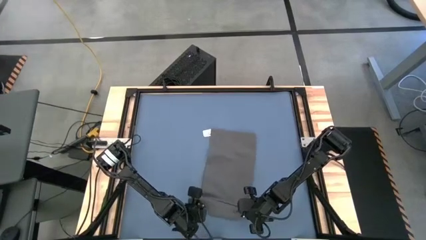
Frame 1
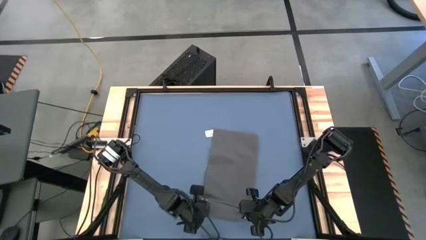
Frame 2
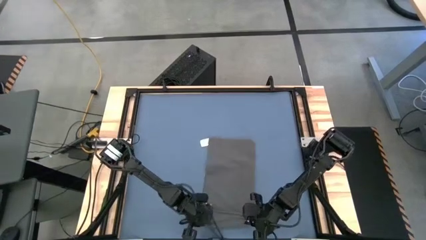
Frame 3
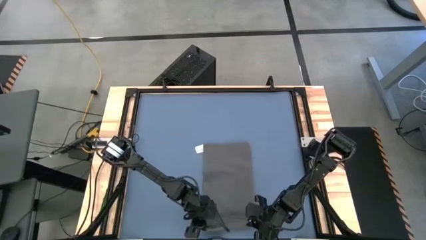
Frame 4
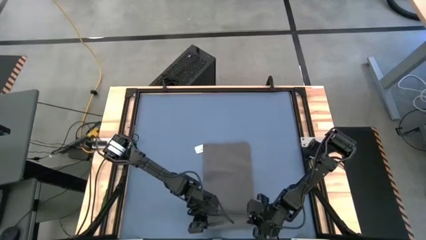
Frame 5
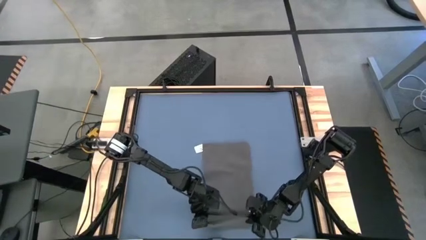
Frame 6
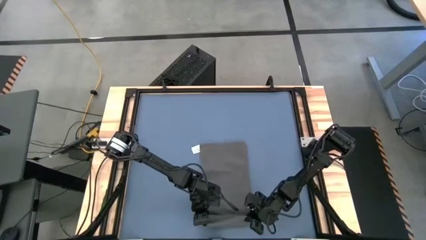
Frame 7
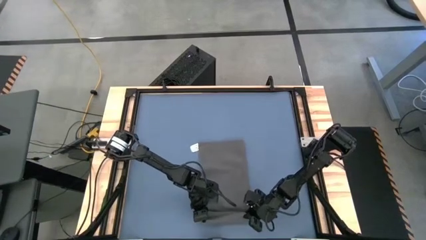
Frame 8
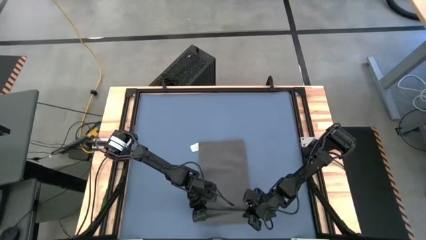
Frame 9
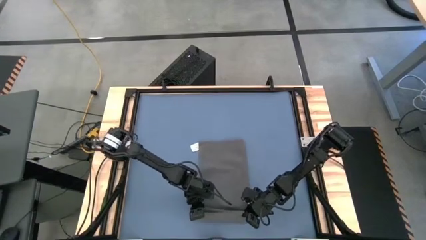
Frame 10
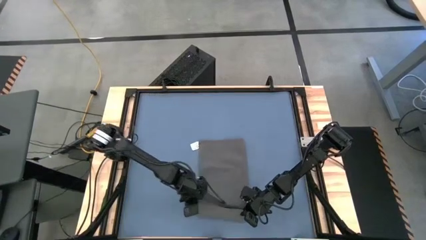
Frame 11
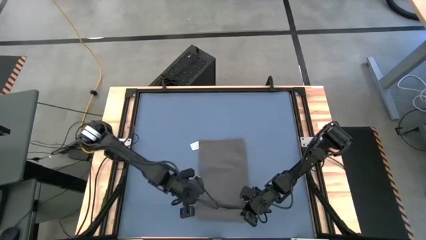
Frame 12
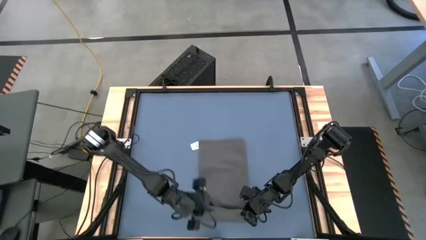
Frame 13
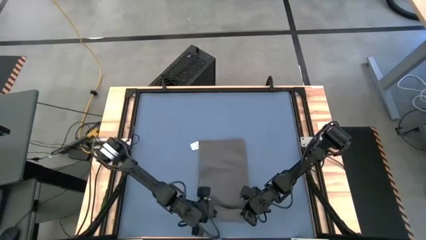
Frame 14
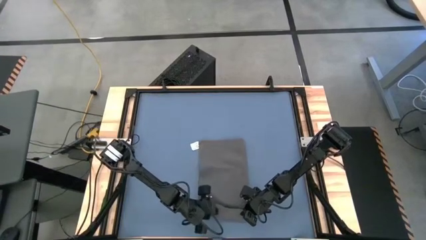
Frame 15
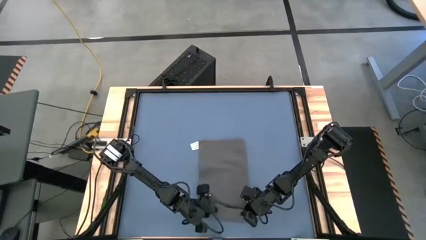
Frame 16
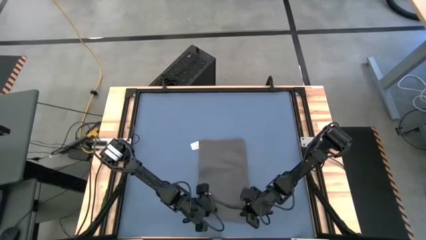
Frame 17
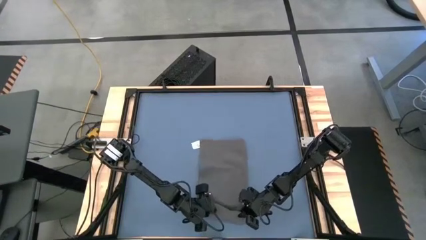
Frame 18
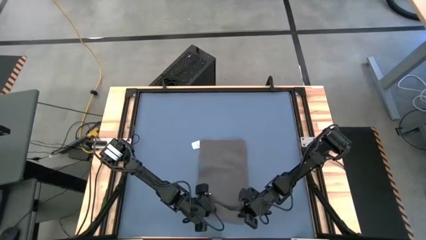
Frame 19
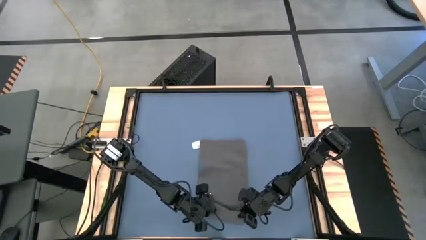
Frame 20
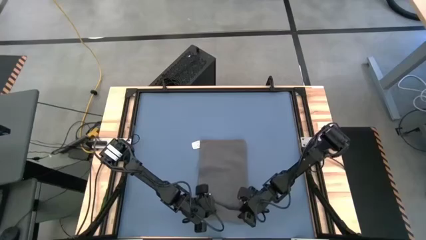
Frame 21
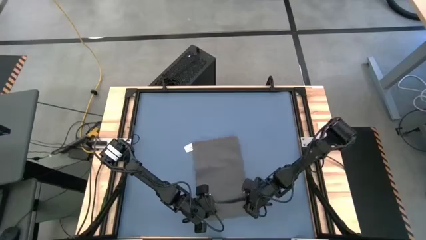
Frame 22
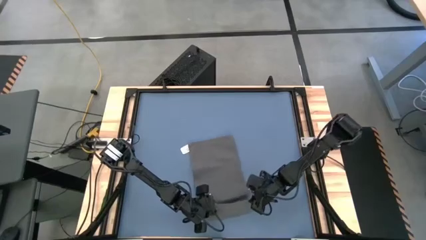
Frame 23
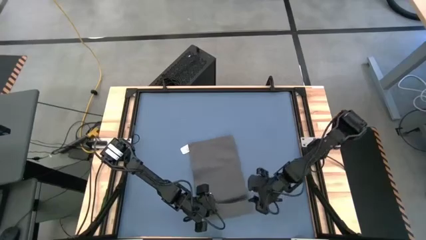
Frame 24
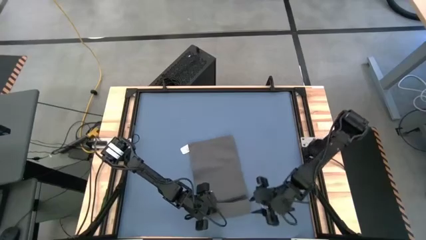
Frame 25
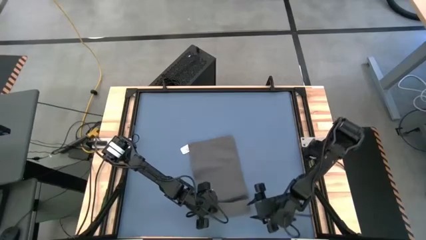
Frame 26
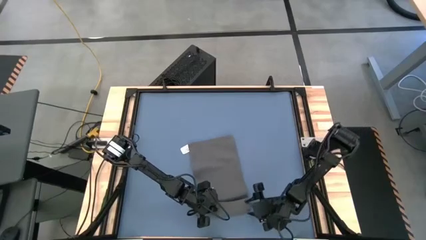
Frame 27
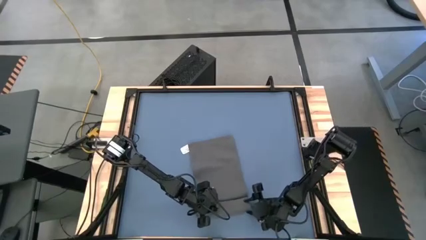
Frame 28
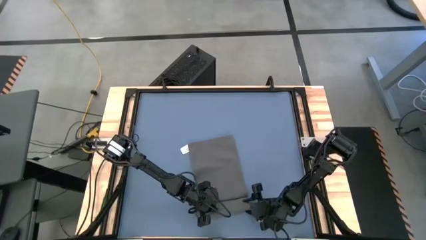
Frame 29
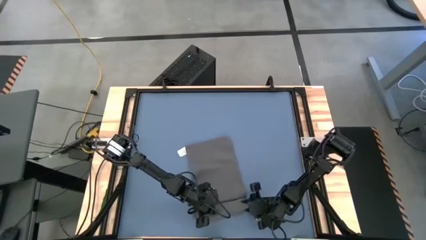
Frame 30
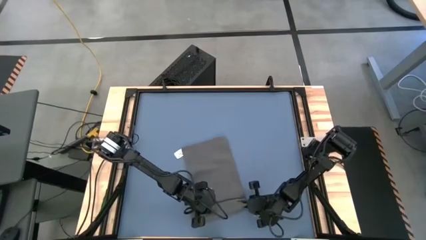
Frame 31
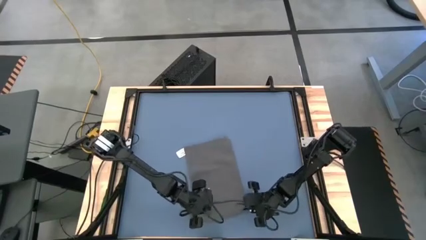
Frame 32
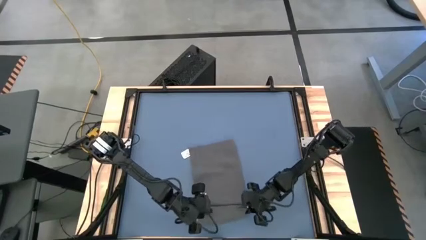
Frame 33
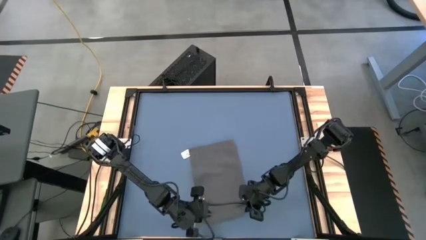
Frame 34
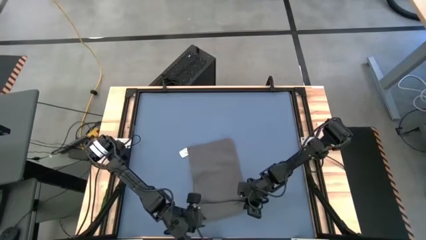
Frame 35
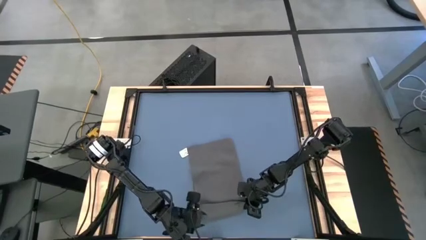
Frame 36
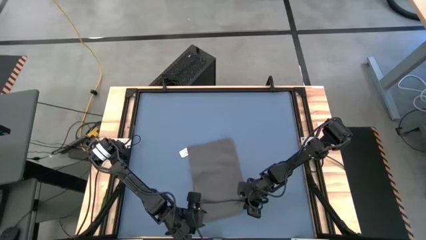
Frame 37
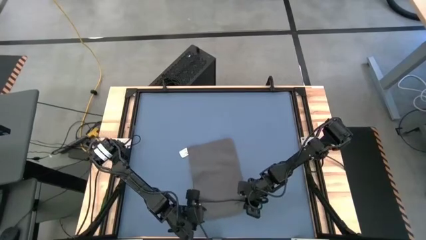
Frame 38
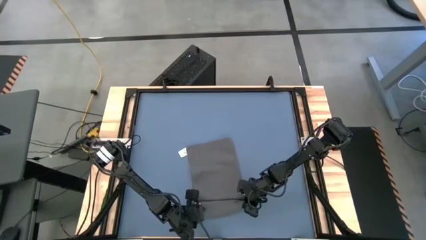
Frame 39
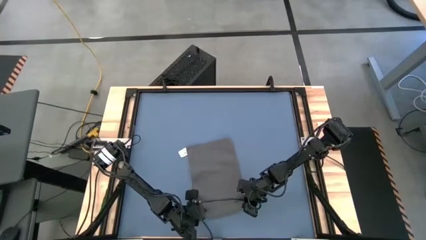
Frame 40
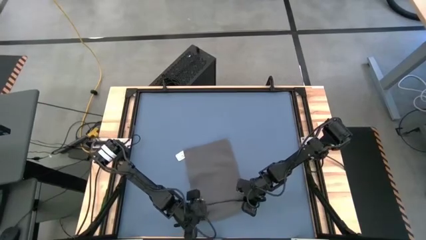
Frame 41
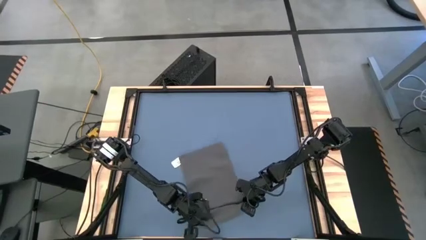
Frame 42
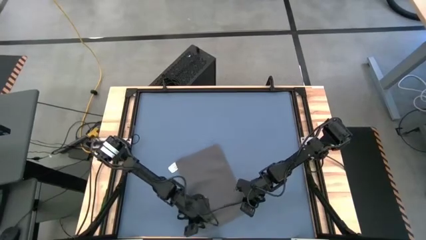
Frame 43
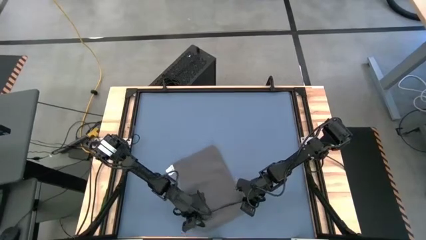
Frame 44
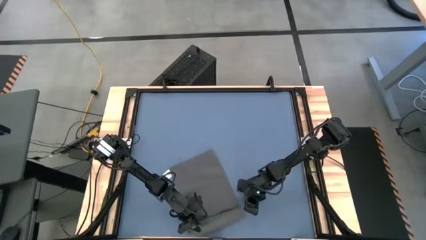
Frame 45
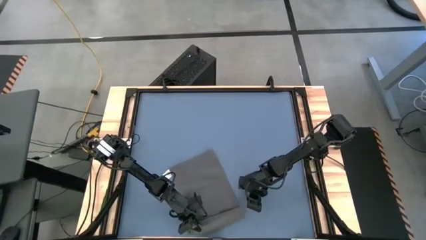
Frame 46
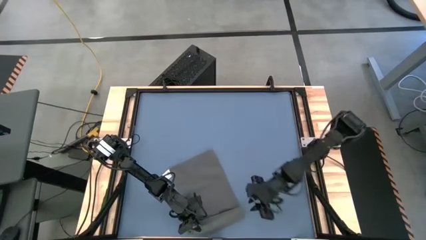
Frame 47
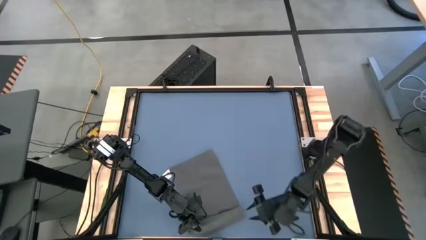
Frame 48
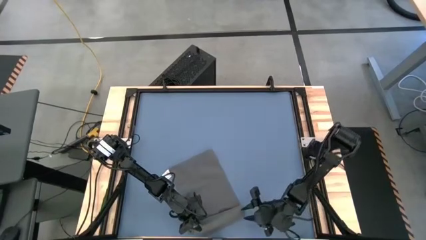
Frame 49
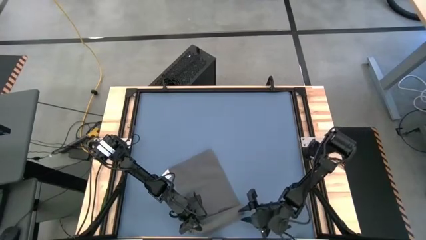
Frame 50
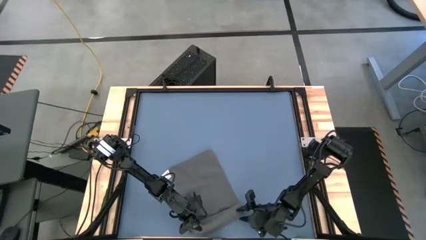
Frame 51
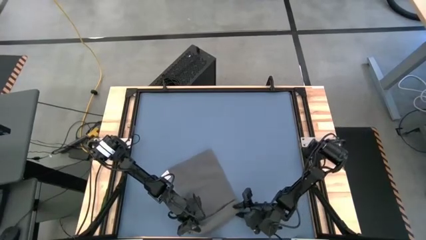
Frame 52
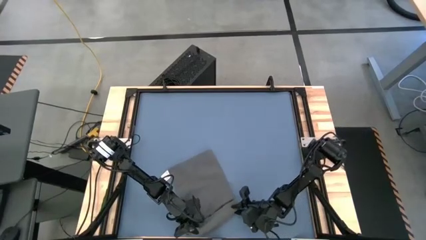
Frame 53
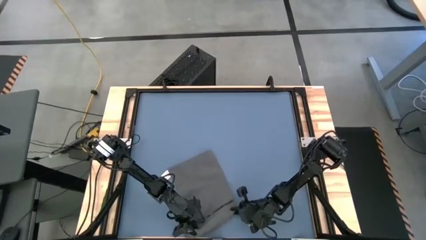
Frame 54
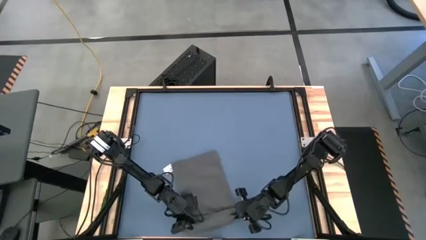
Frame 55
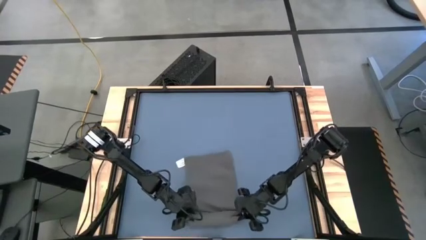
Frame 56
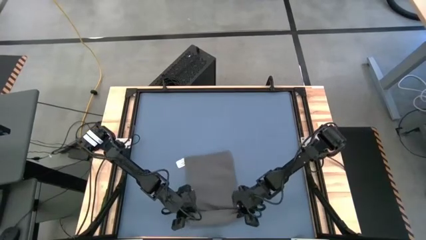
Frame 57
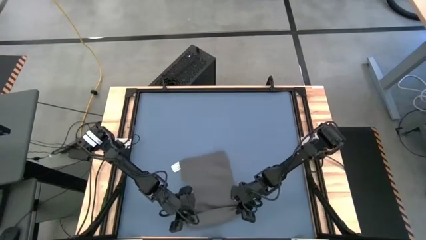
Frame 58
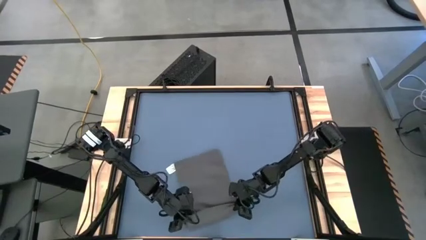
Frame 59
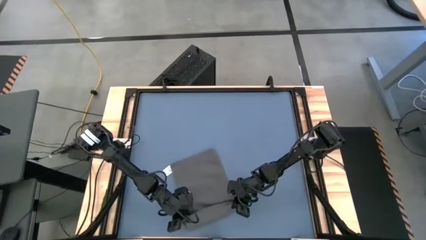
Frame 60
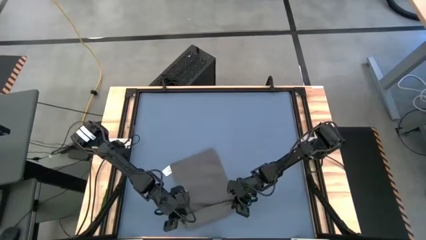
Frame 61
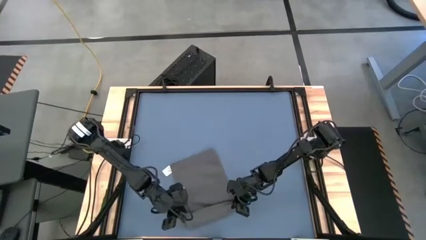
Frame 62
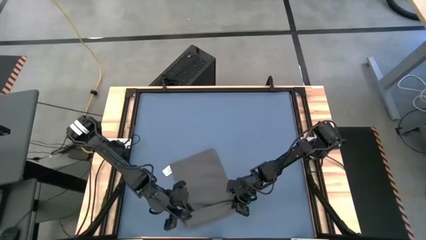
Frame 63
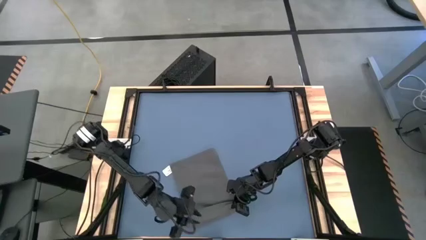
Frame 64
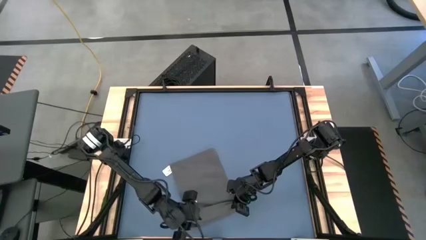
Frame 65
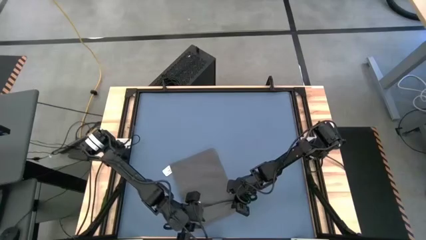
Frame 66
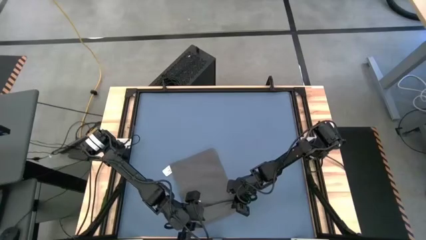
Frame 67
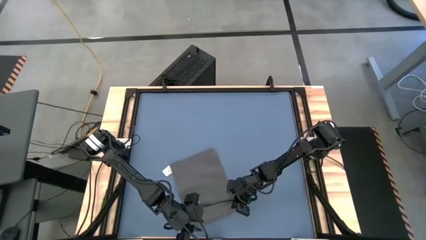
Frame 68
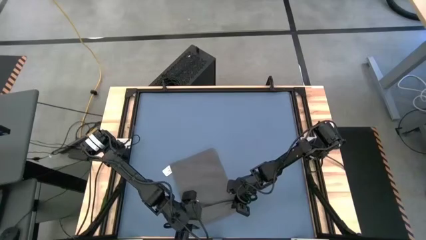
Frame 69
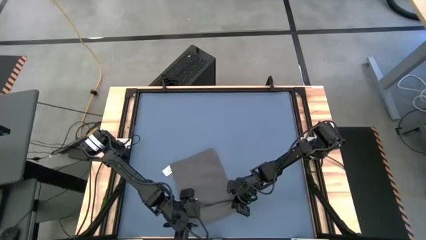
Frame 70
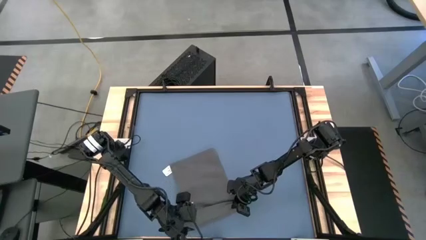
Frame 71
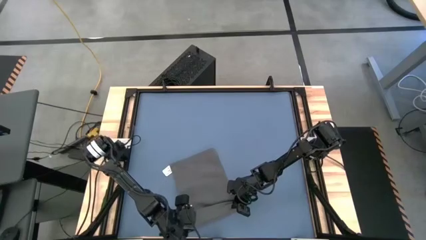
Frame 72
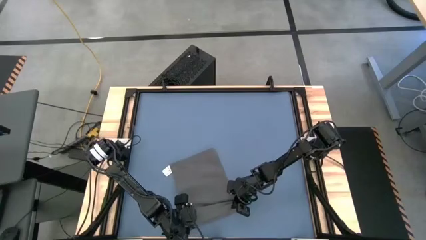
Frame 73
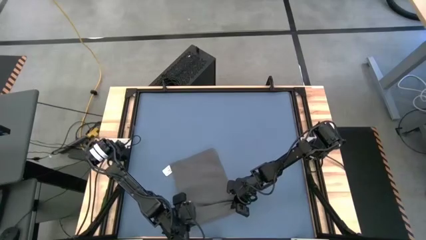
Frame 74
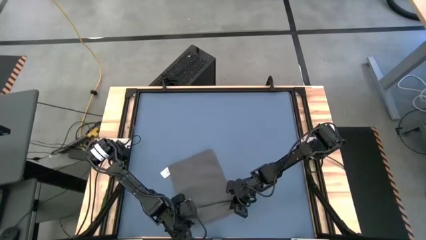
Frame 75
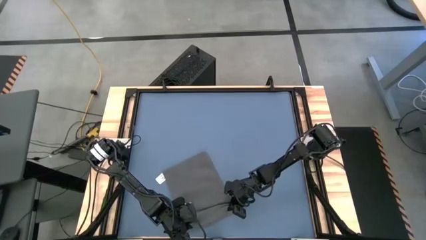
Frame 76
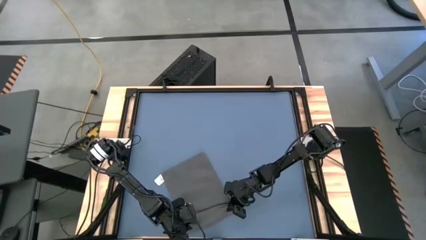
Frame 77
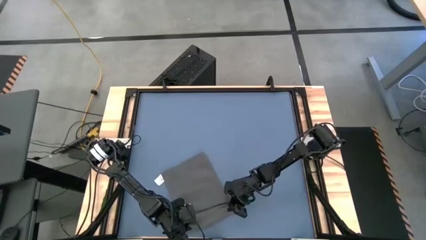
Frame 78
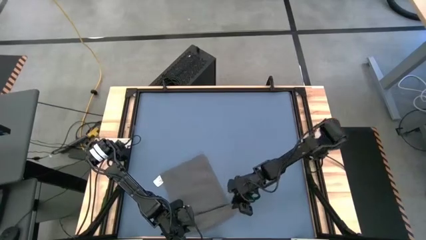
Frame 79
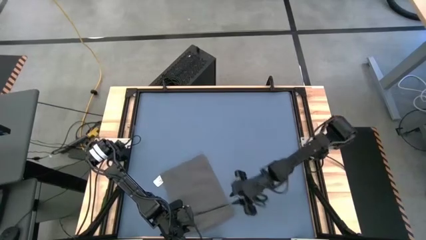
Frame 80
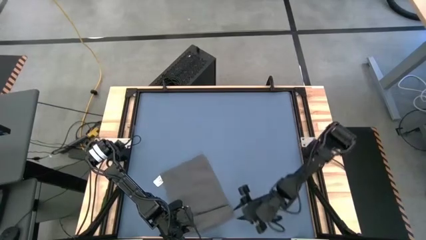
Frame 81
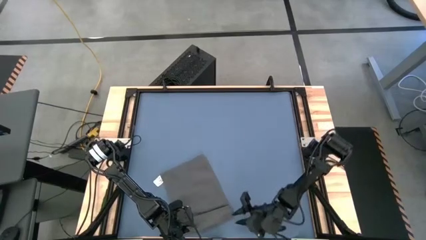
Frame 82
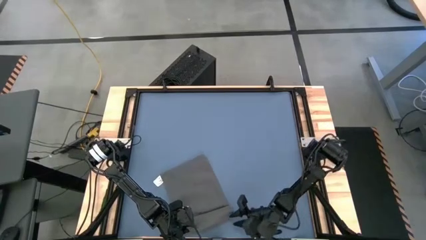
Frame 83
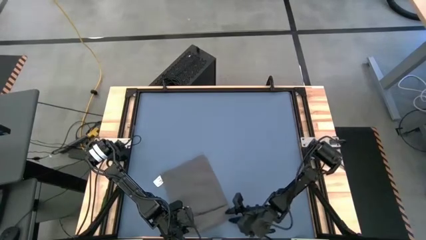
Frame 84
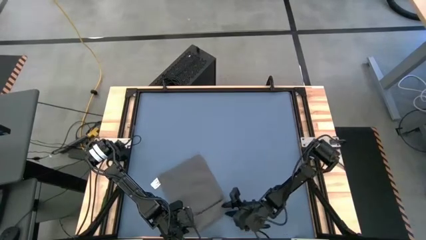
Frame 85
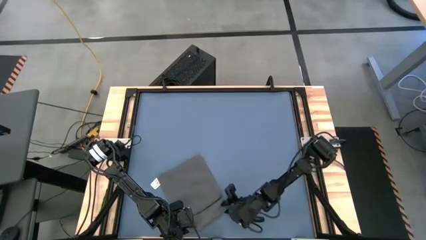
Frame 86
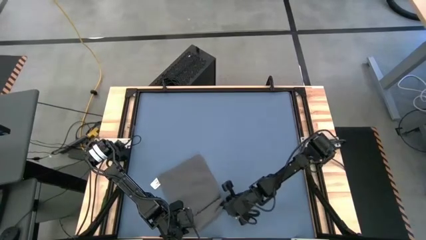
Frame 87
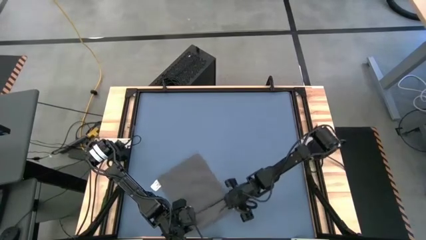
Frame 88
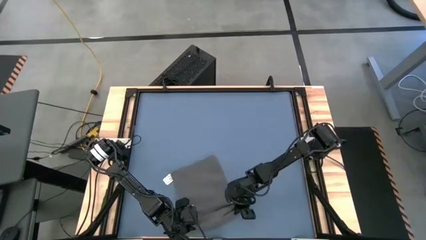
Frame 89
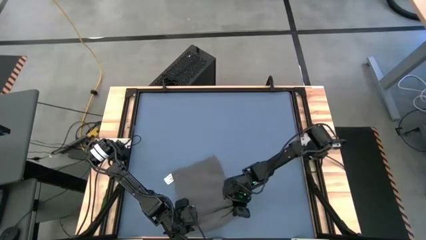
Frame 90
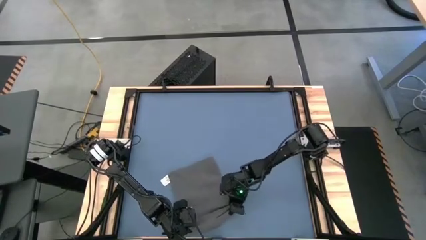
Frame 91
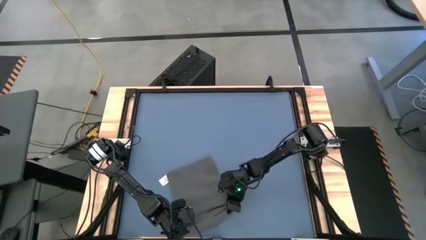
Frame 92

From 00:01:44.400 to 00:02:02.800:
Task: Roll towel into tight, uniform cylinder
Roll the gray towel
